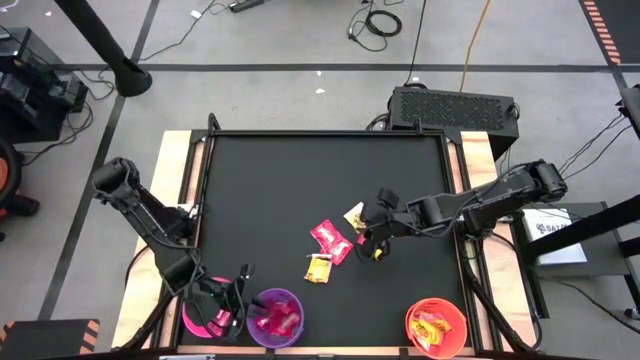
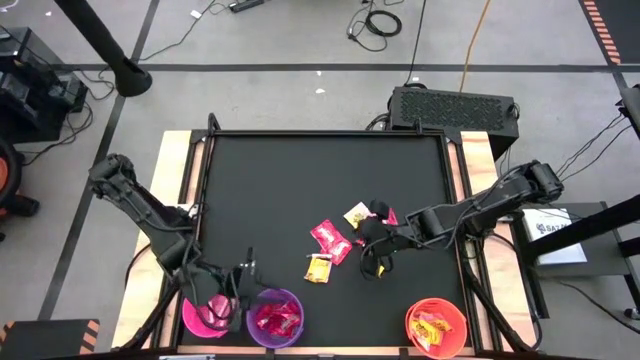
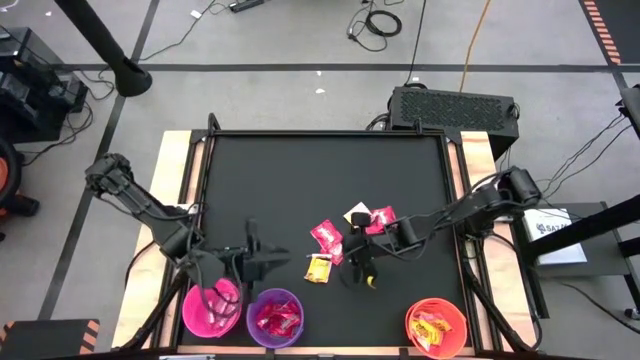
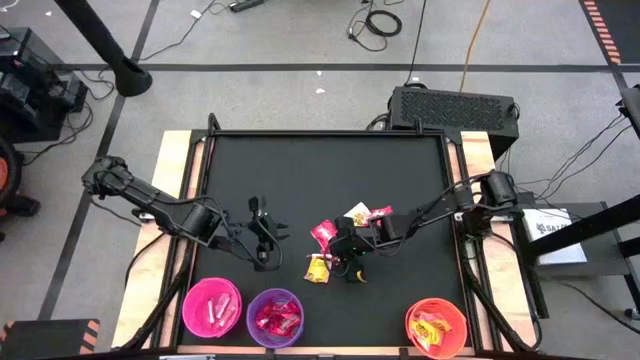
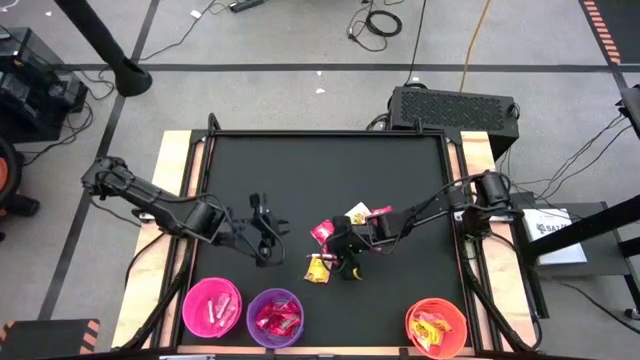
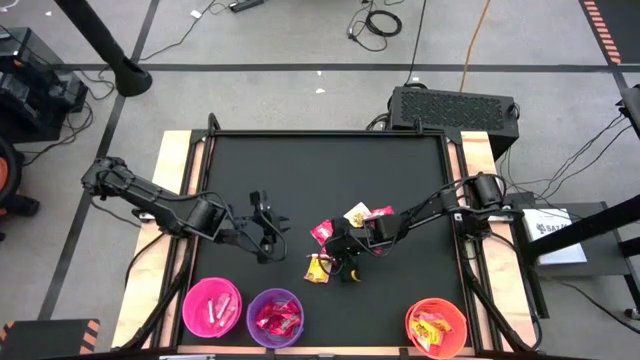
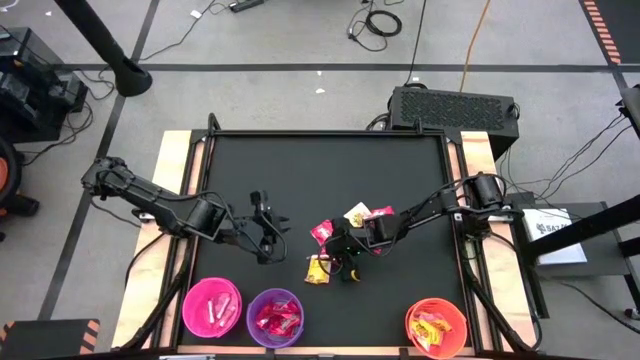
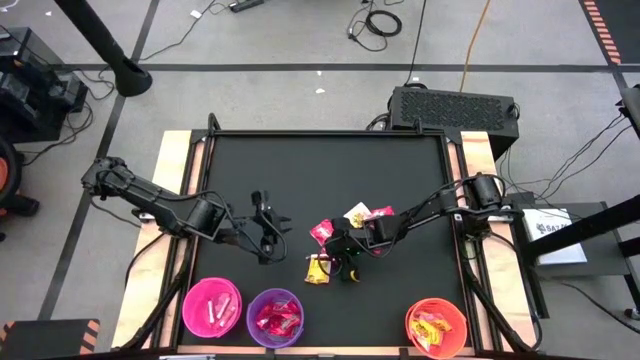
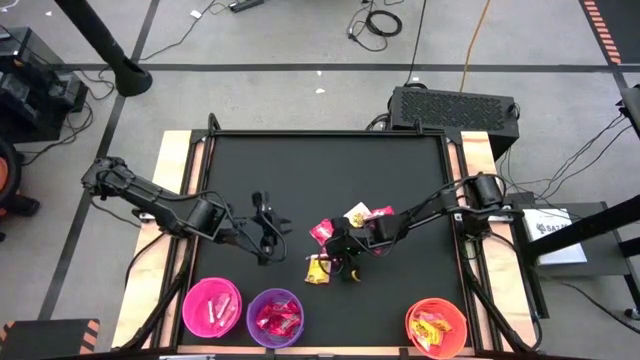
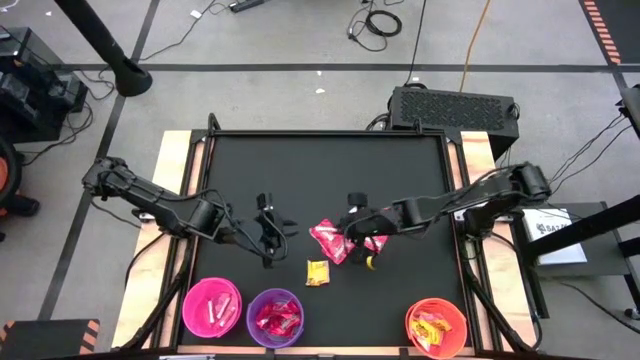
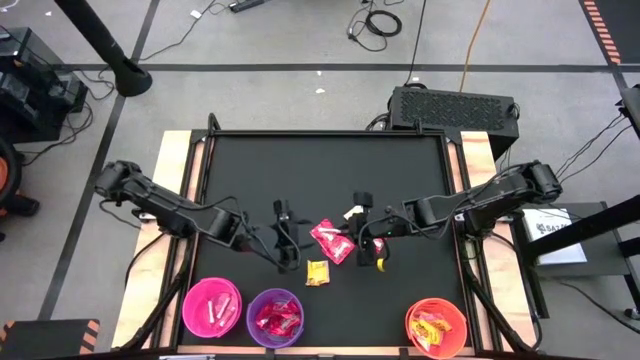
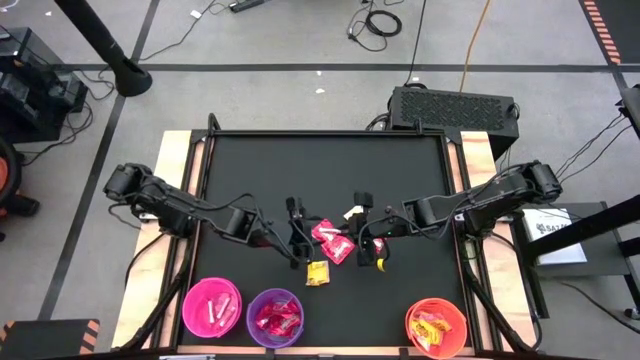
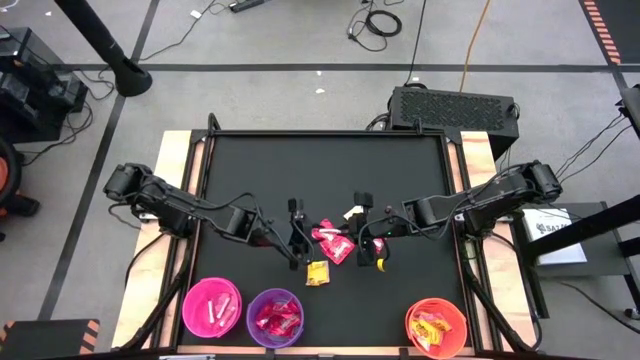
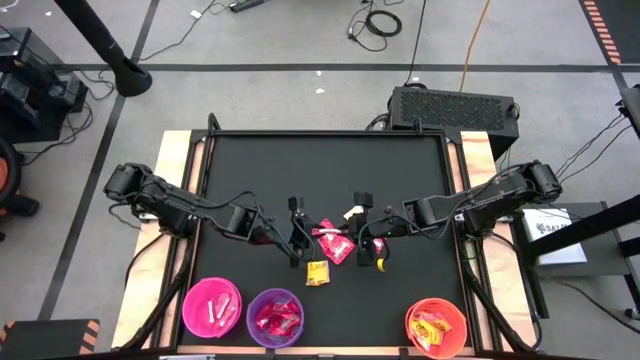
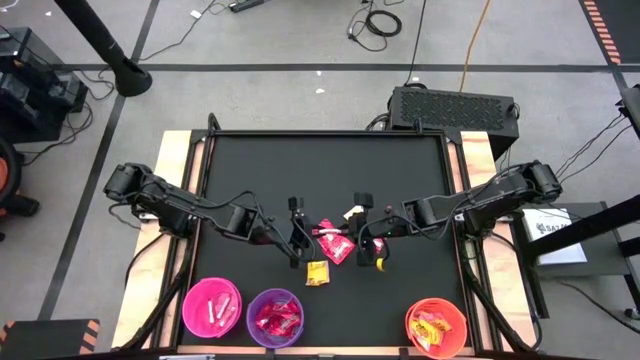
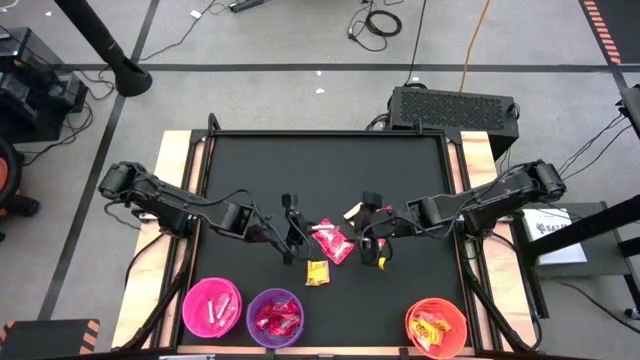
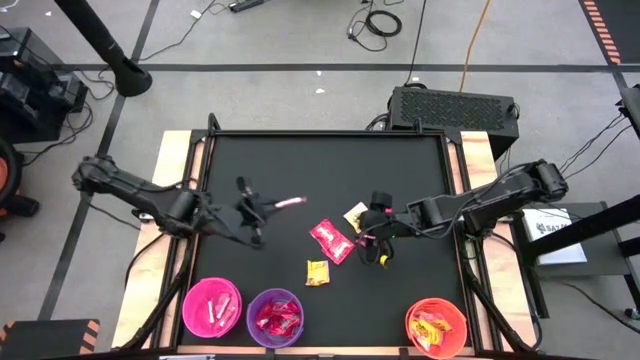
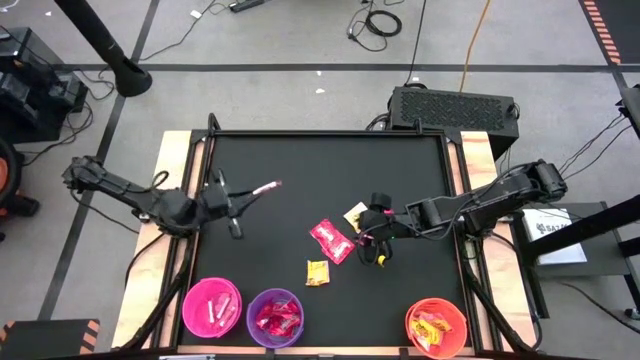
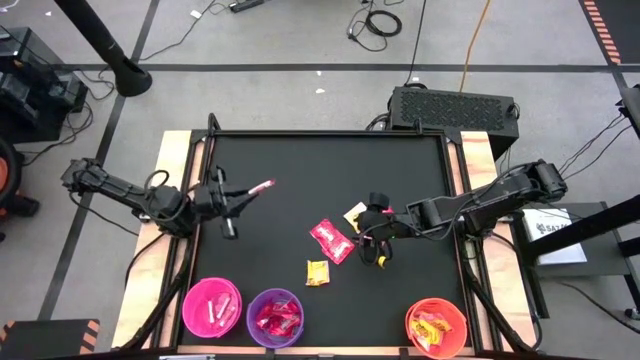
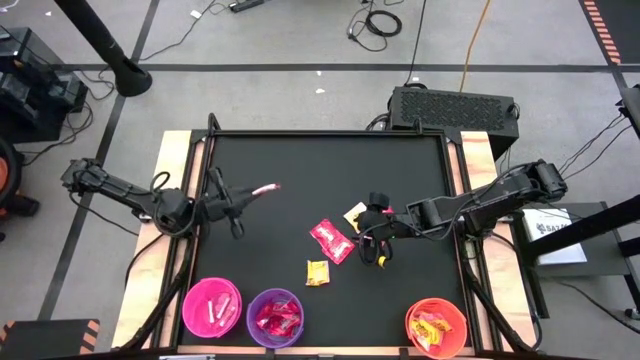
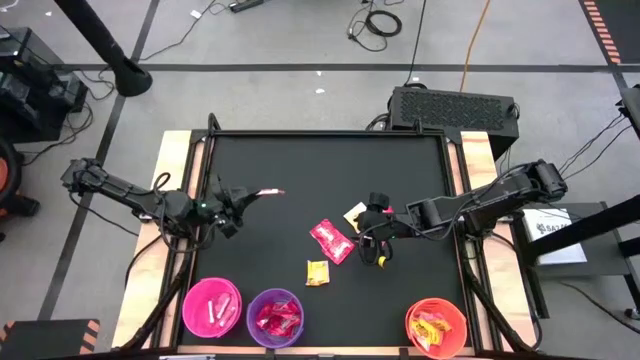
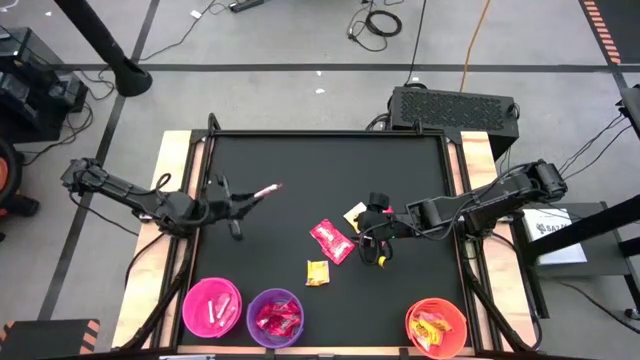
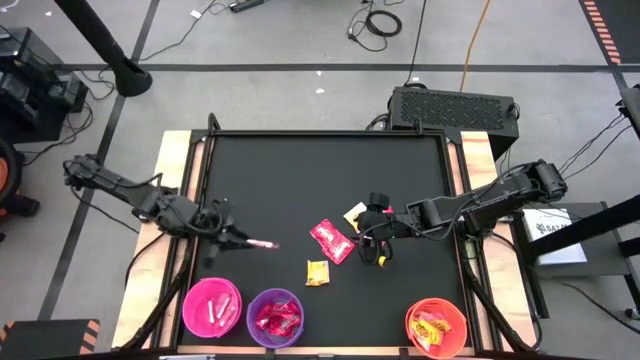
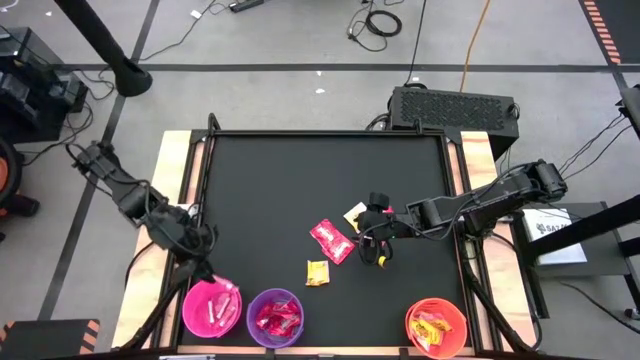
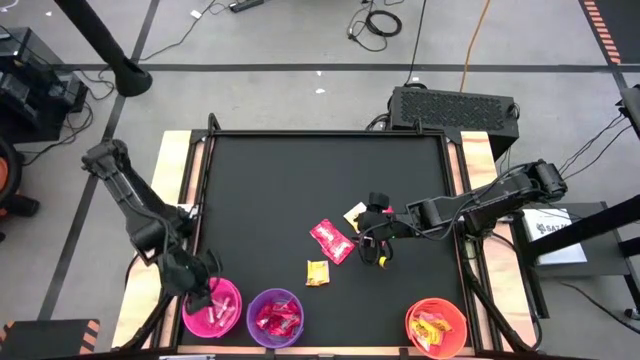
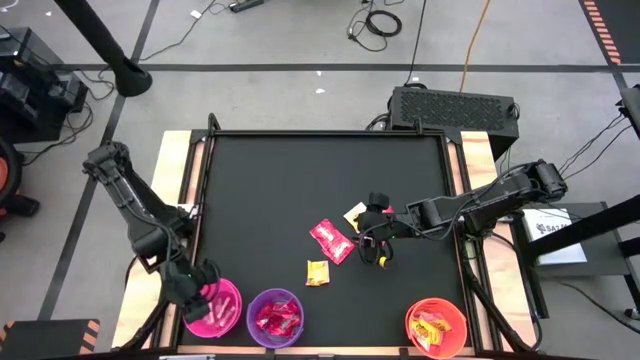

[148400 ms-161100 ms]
Task: Sort candy by brand, put in halloween buckets
Put the orange candy into the pink bucket

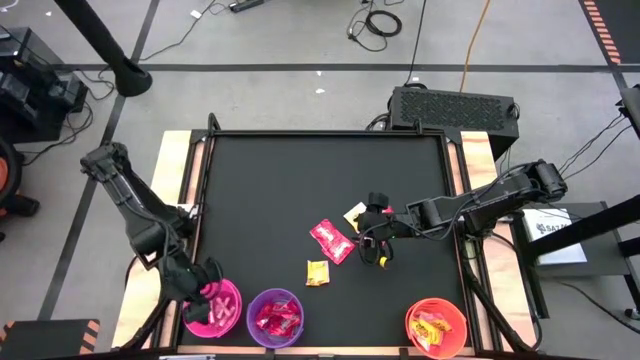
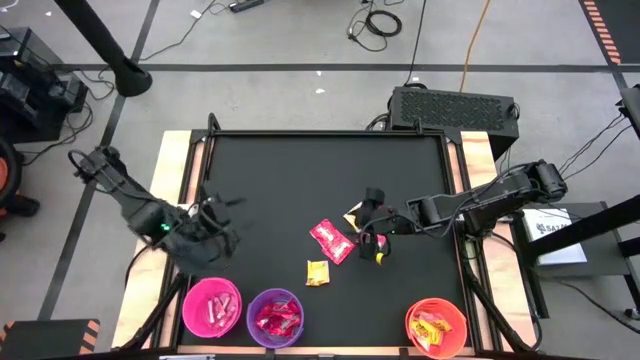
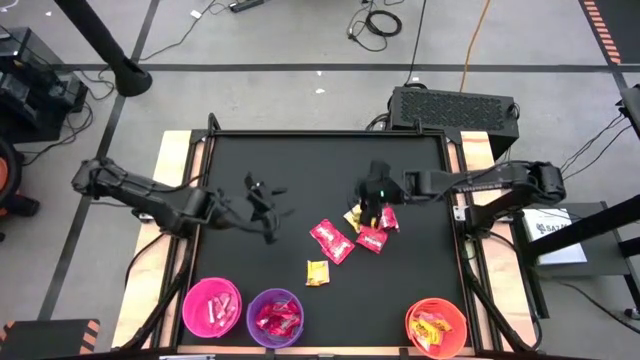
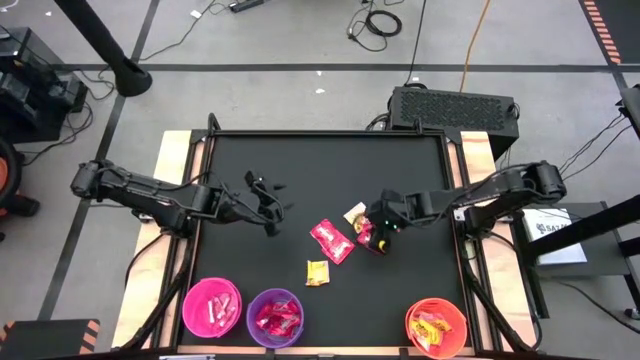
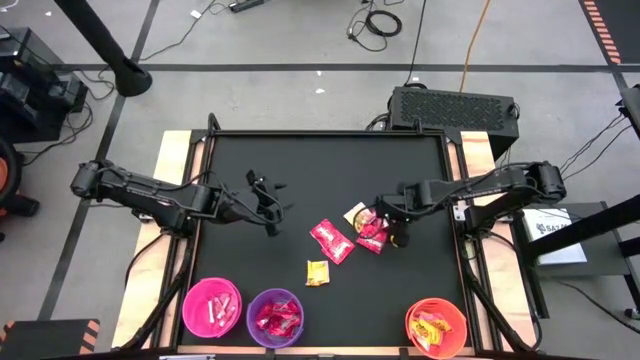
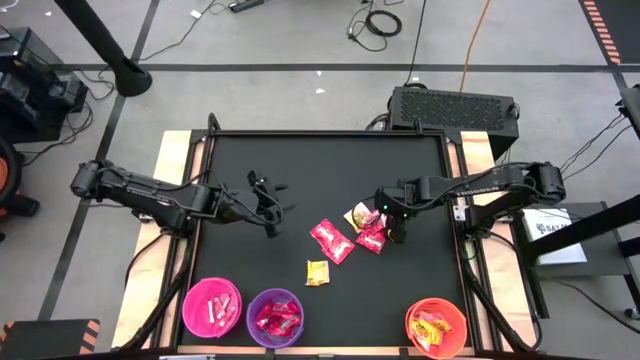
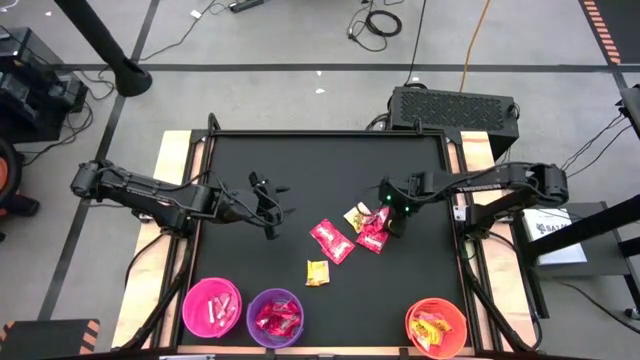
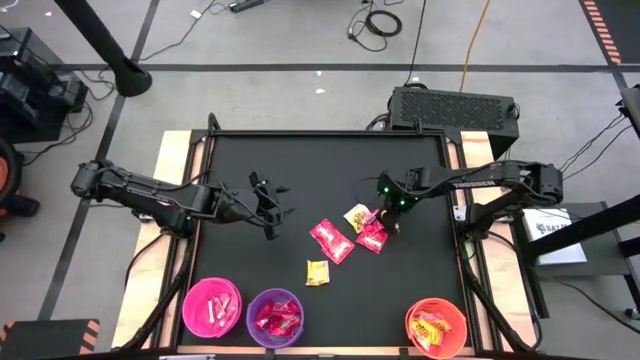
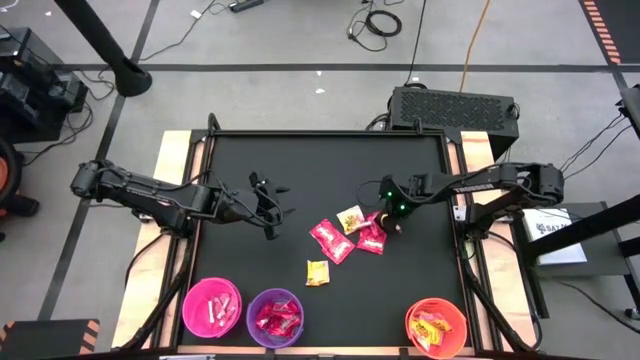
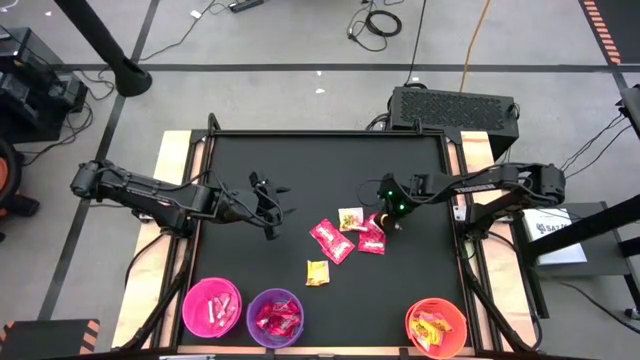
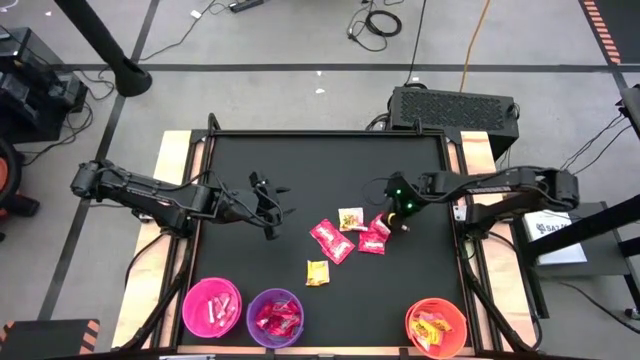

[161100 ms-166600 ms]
Put the red candy into the violet bucket

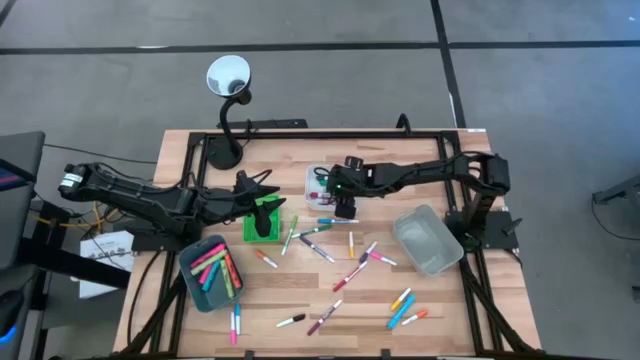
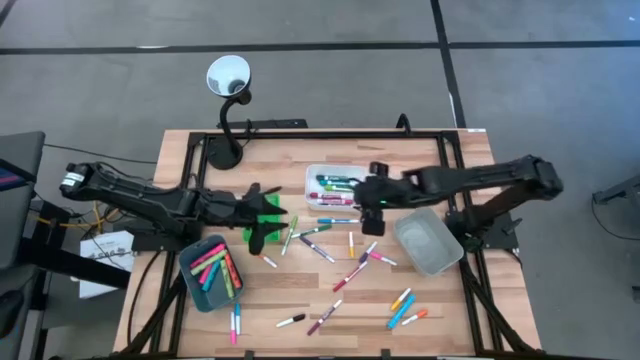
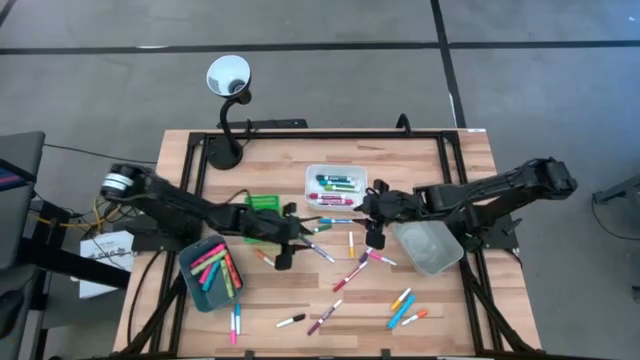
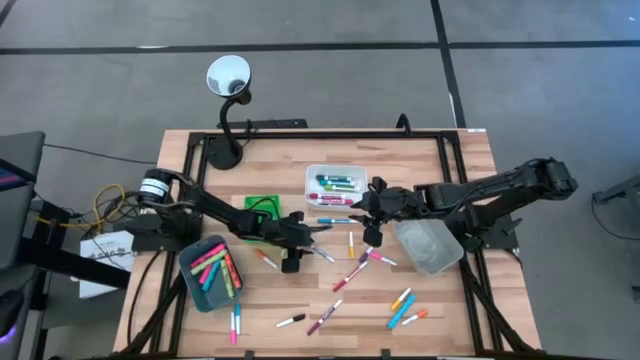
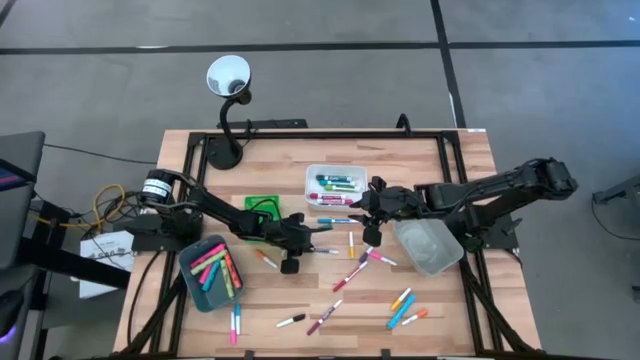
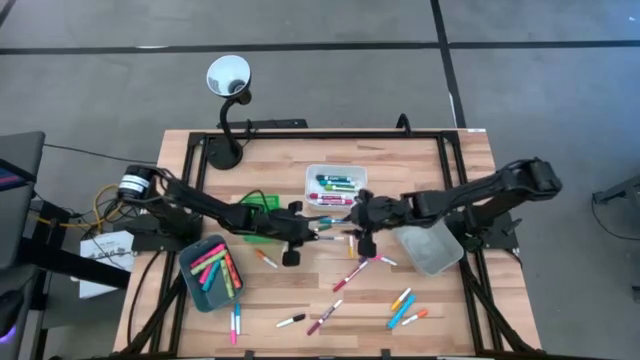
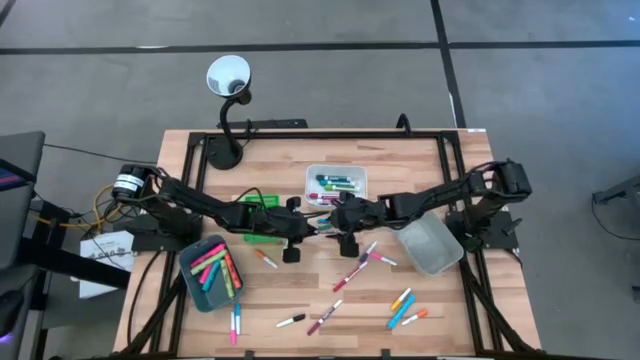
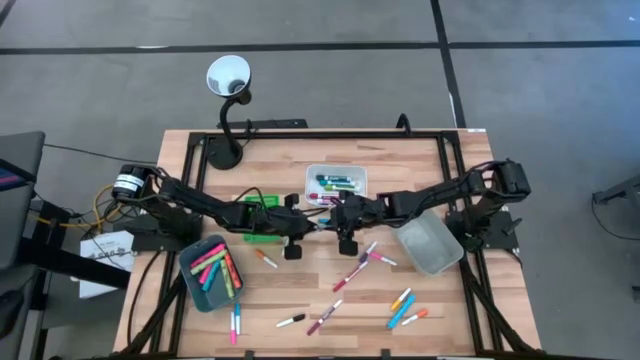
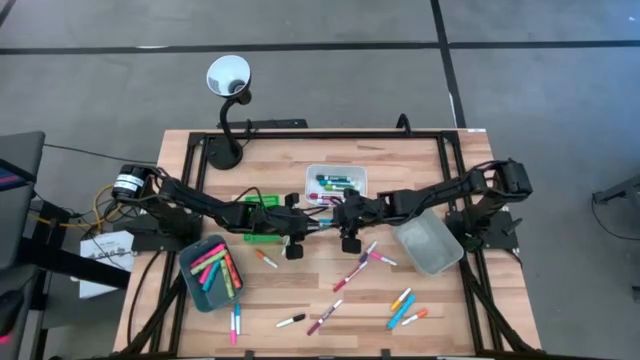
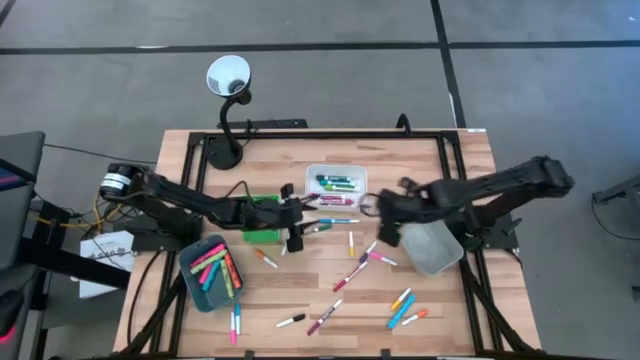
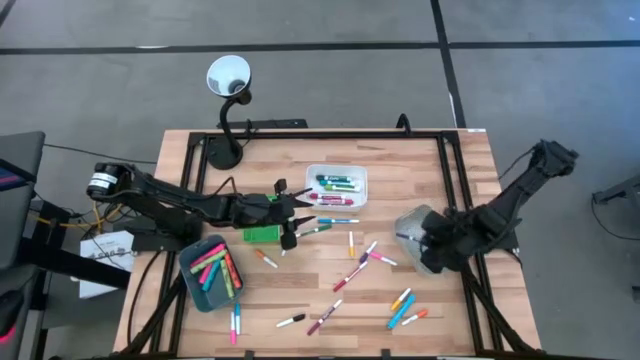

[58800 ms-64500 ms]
Task: Pick & Place Markers
Put the small blue marker pen into the gray bin
